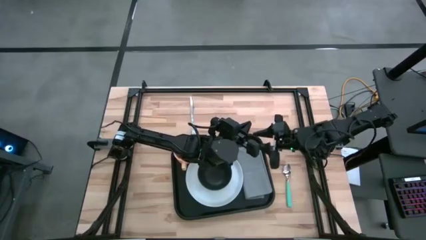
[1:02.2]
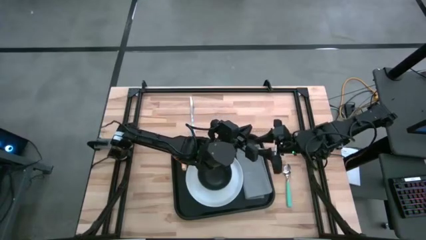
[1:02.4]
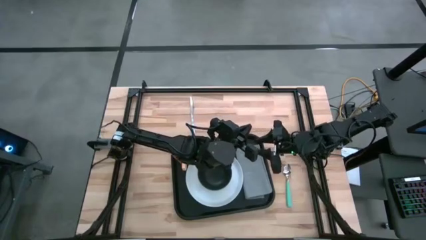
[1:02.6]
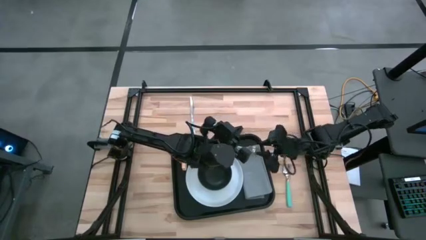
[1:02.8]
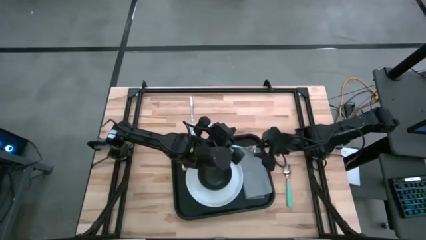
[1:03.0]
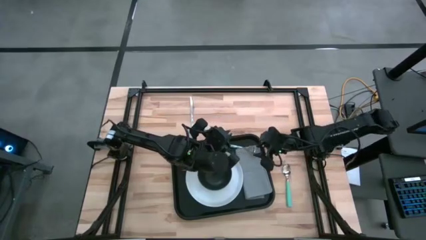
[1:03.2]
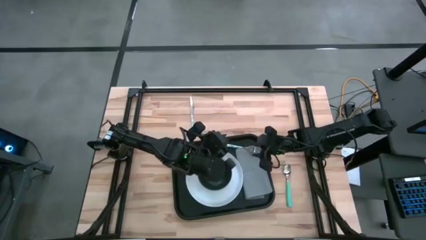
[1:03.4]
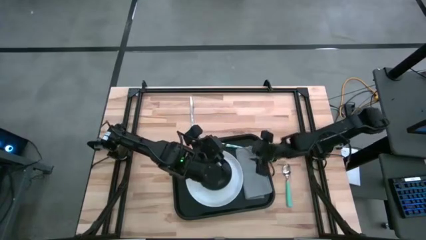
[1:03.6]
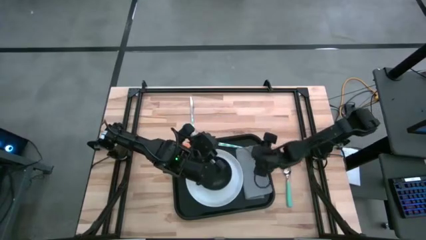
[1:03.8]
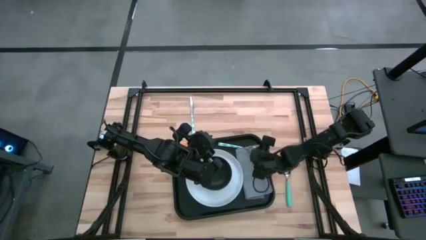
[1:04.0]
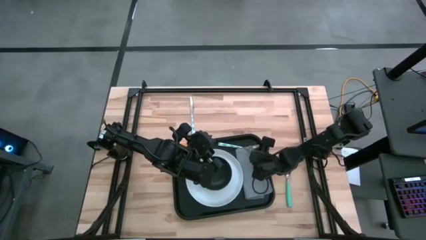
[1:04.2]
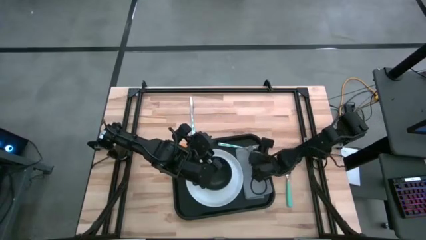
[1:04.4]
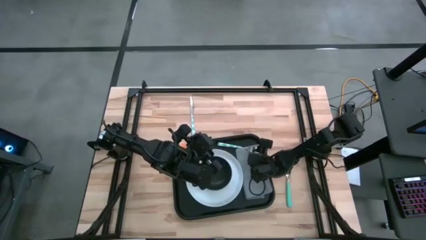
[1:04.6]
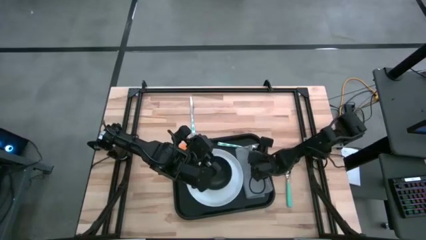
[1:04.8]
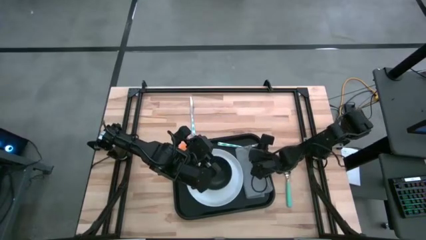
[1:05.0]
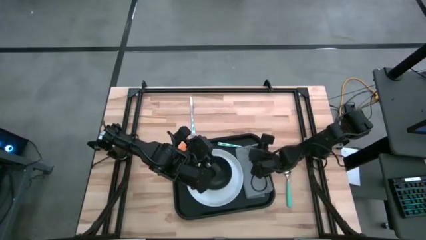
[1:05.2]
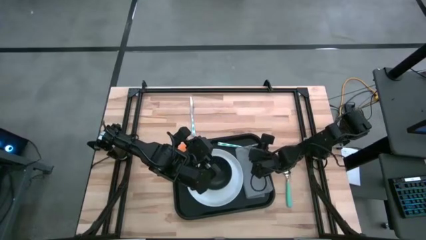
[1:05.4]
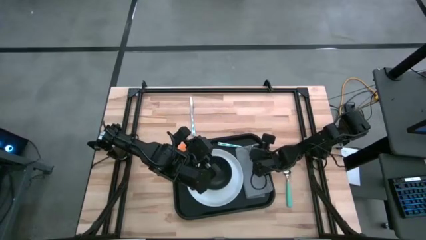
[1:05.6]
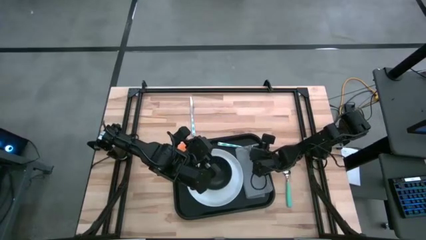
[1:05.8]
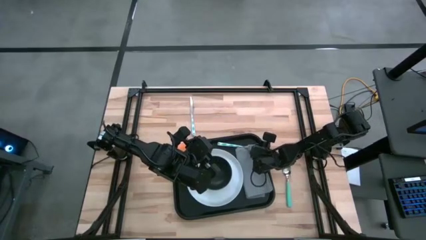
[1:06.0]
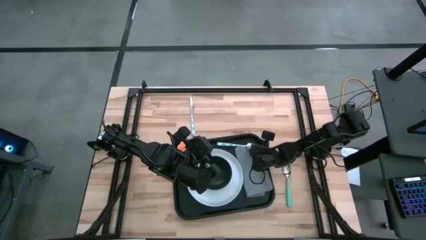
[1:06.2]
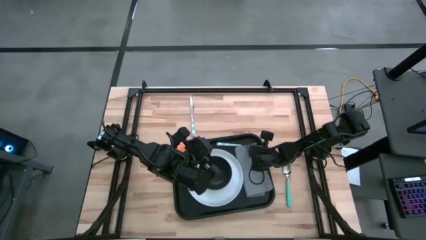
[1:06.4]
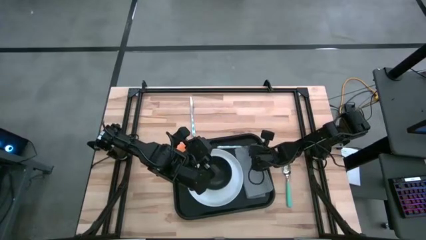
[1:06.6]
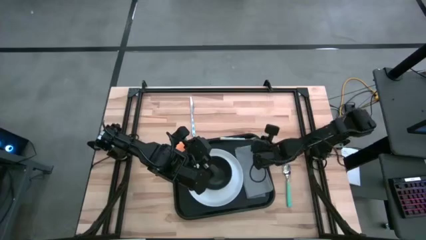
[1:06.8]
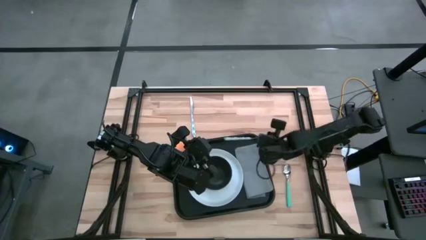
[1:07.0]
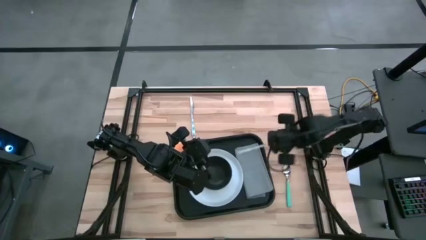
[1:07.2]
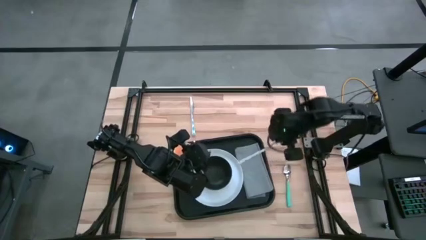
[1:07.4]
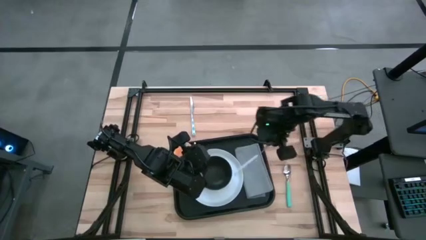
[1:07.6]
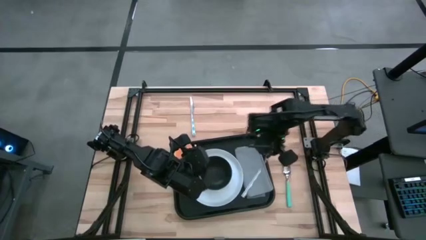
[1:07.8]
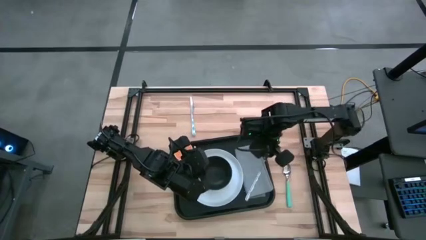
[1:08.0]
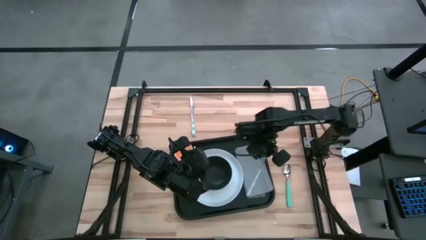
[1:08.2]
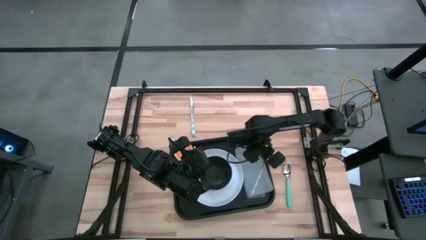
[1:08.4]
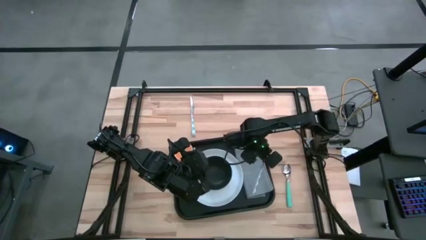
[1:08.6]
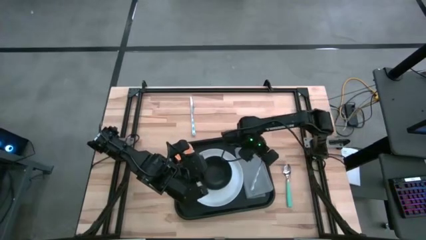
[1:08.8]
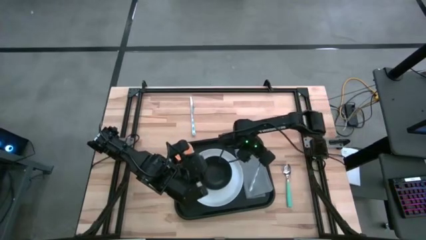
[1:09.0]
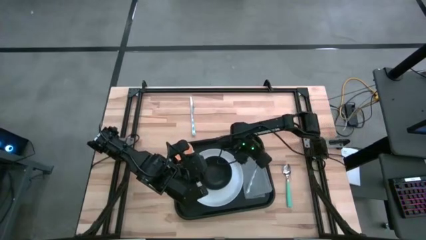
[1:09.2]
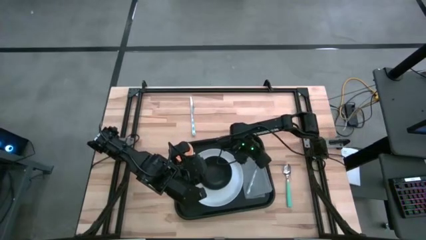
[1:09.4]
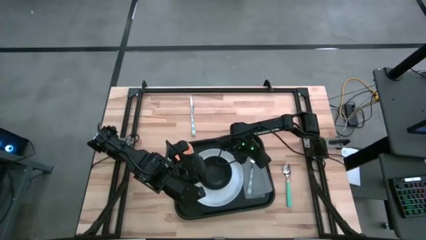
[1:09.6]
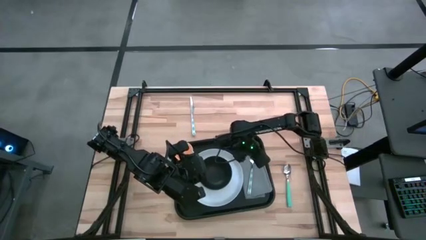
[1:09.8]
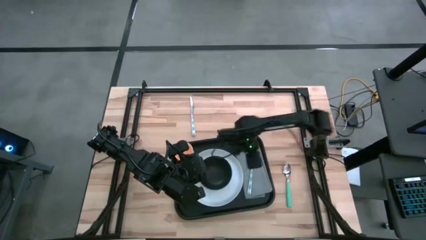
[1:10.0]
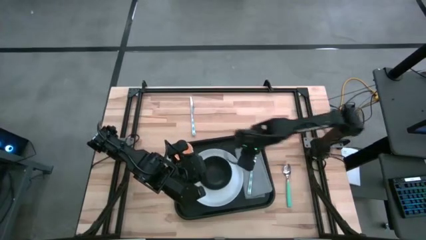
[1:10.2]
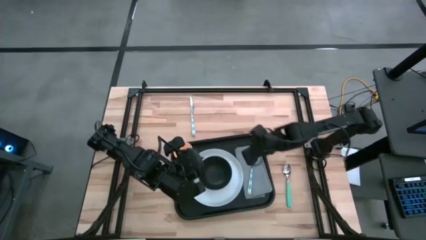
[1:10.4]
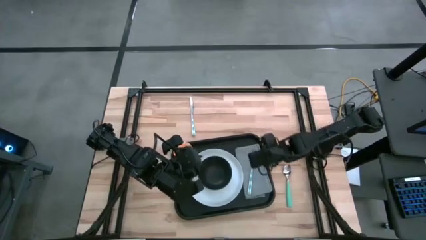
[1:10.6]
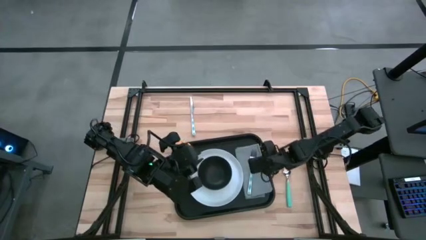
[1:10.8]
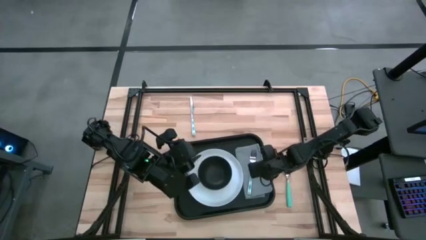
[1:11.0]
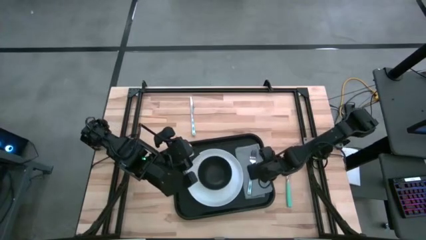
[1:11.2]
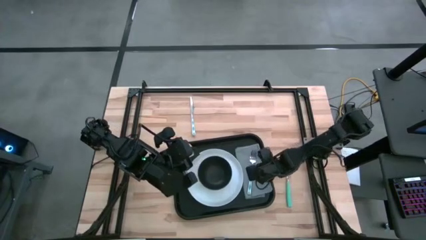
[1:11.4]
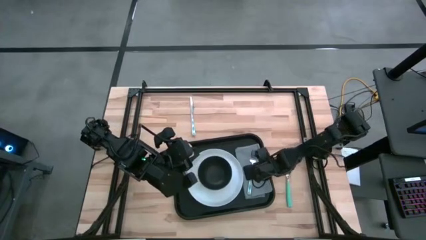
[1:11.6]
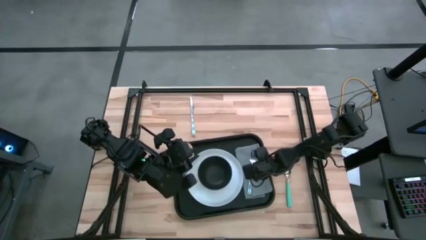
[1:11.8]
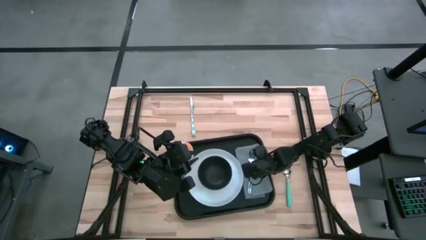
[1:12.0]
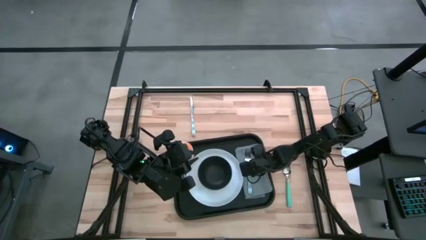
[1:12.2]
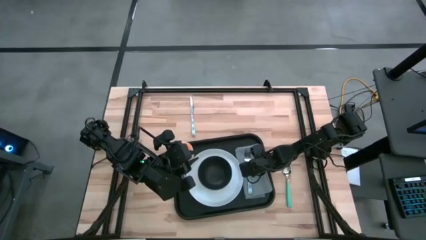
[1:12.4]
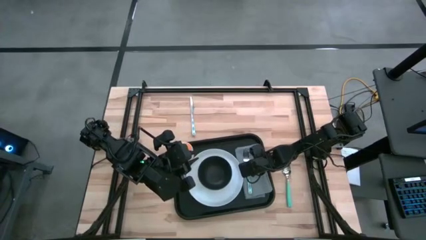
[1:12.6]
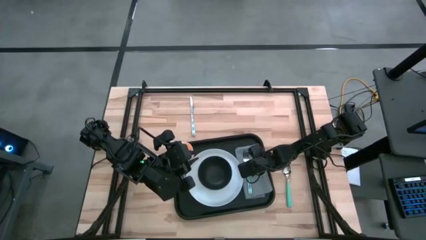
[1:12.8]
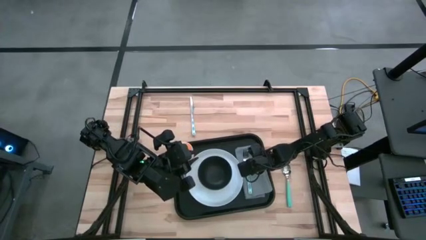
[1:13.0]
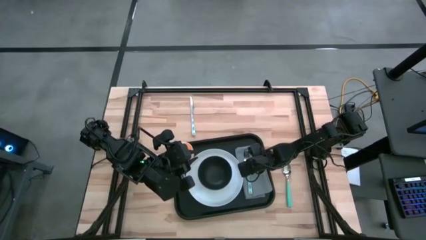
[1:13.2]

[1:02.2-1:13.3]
Task: Set up tray
Put the blue fork on top of the gray napkin

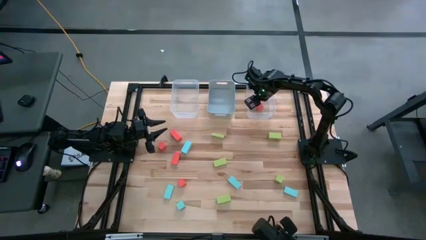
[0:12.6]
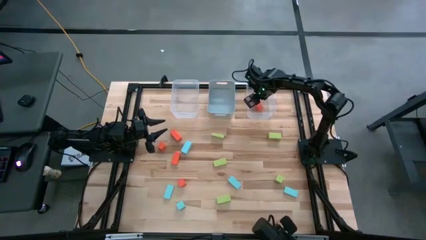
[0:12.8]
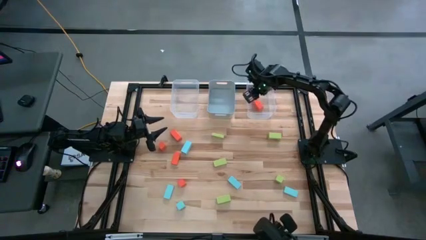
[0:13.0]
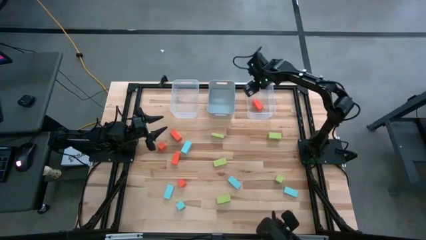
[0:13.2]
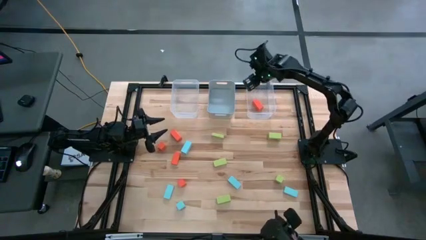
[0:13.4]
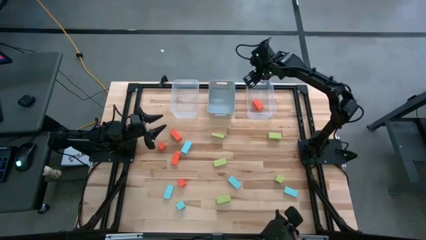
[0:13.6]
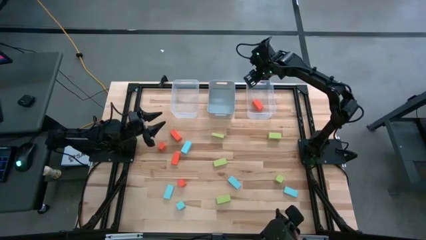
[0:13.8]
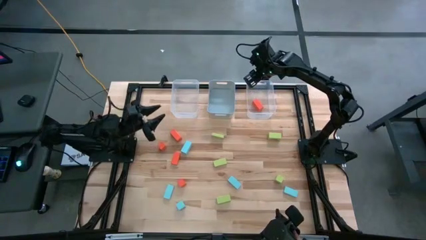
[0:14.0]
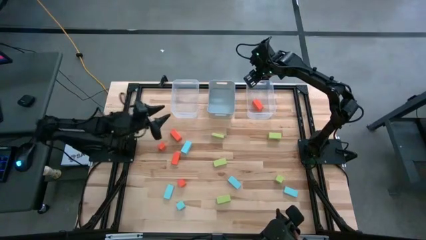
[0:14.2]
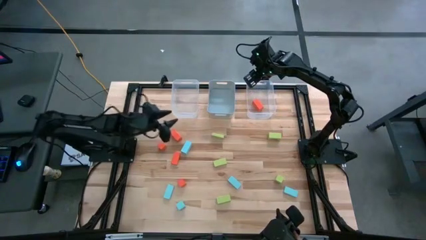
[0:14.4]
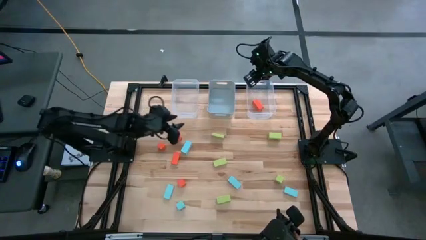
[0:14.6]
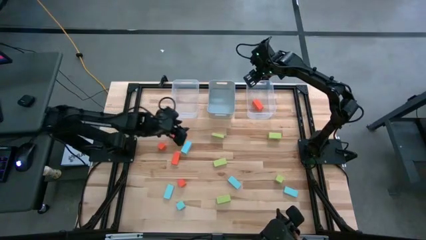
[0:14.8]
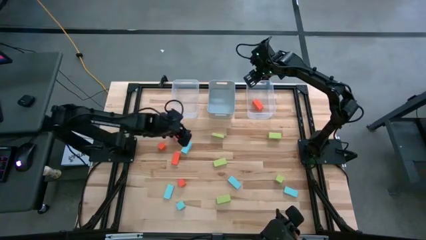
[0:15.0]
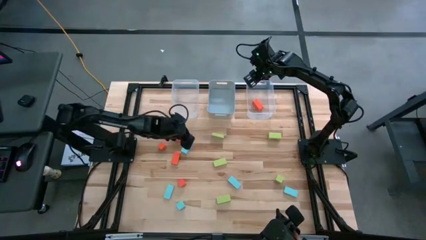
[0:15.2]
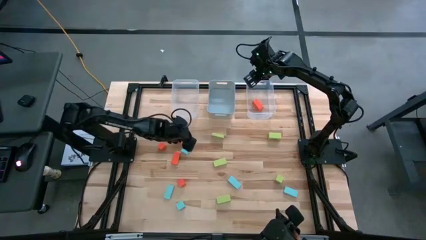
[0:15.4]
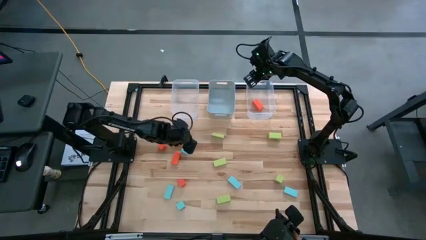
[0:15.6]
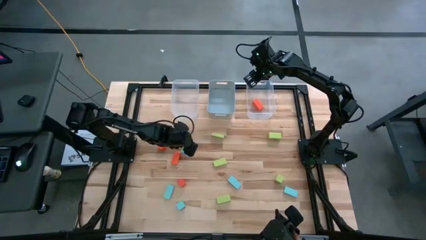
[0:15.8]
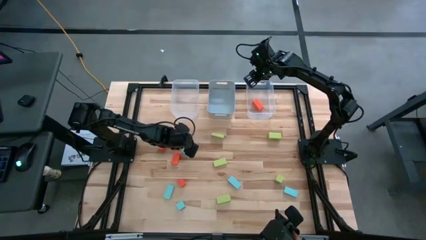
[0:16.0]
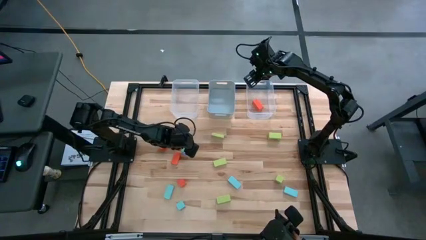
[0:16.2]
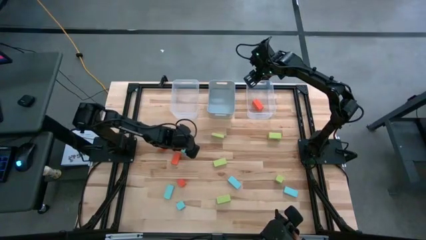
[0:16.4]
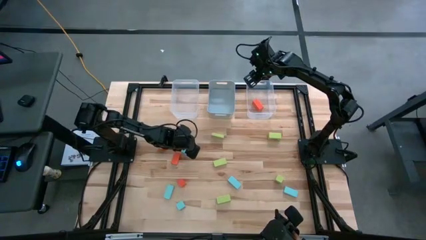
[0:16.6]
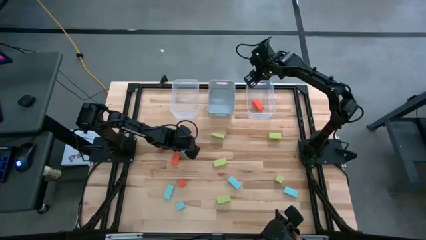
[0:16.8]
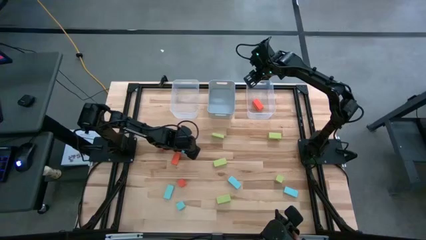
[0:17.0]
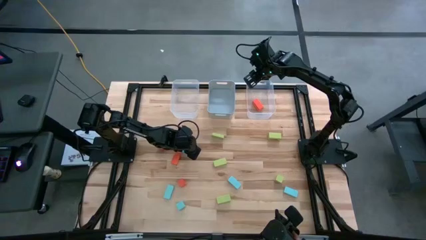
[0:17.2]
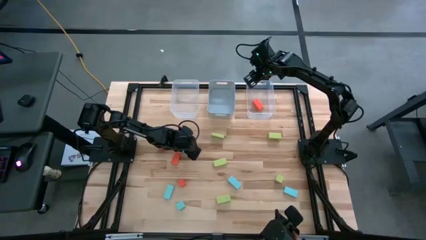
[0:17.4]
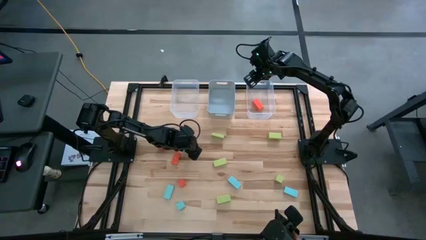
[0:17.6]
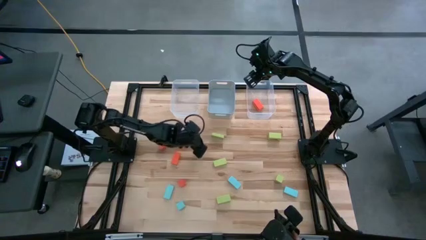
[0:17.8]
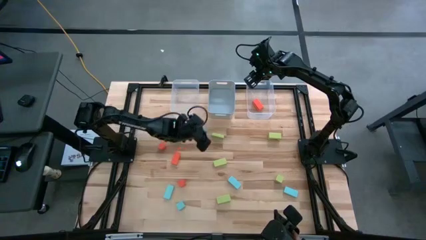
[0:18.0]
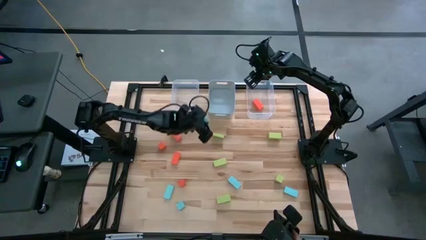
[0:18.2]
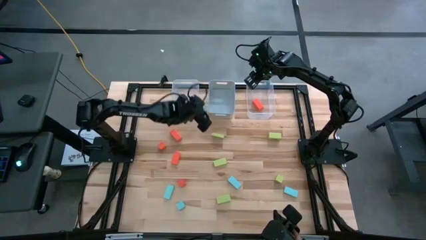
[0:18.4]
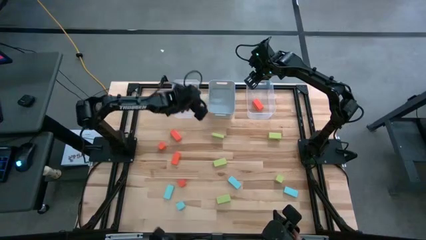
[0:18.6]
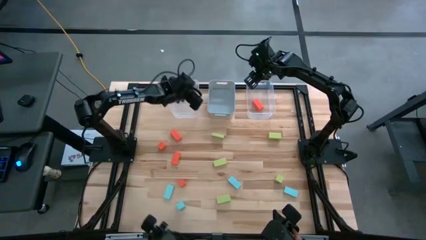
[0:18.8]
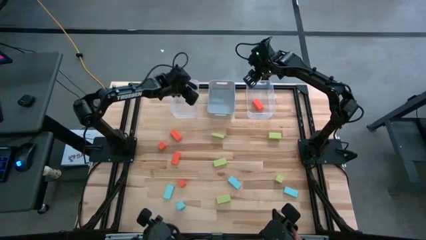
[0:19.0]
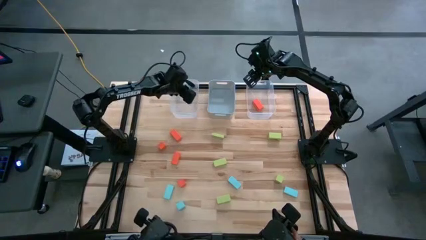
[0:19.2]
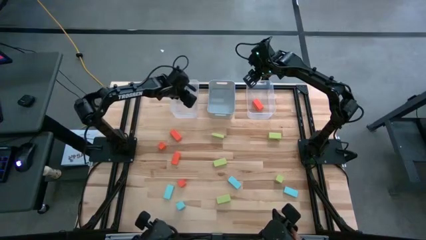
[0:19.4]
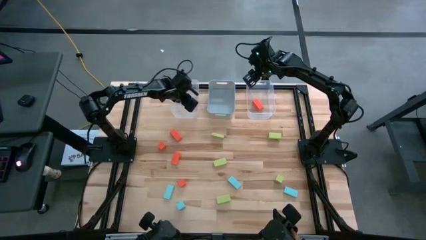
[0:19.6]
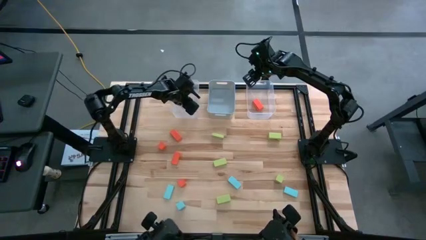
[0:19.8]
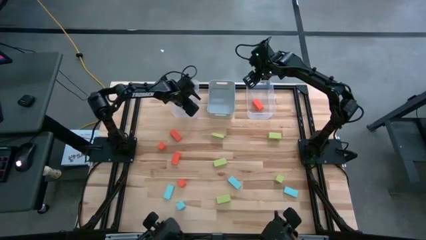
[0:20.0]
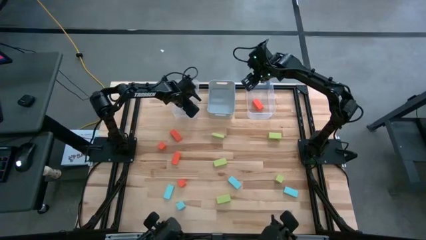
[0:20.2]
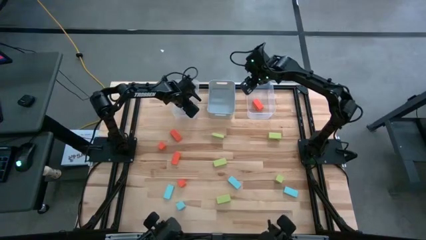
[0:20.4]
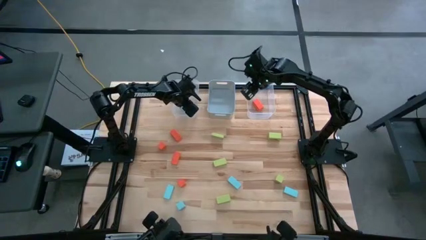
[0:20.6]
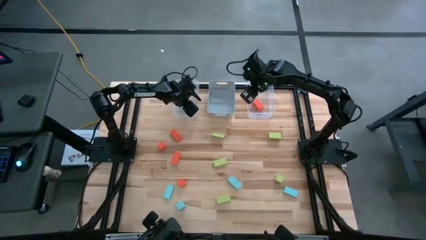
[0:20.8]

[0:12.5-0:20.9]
Task: Sort & place blocks by color
Put the blue block into the left transparent bin
